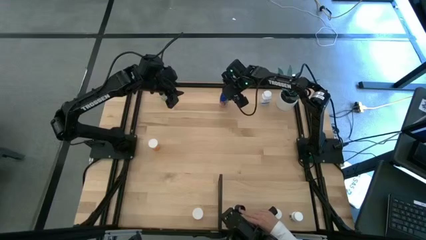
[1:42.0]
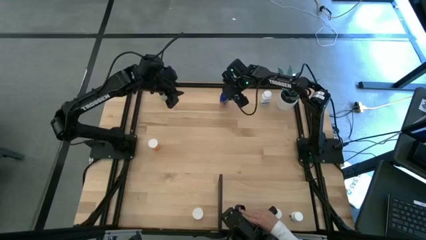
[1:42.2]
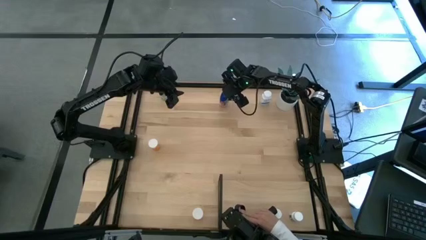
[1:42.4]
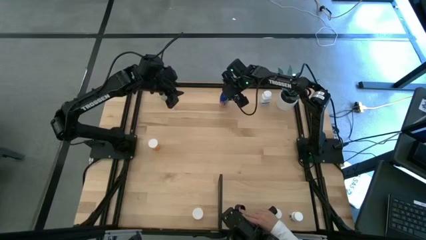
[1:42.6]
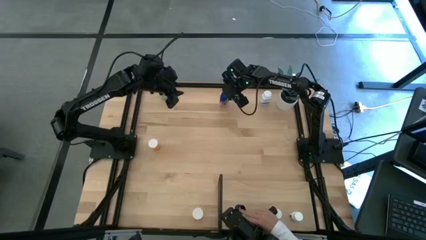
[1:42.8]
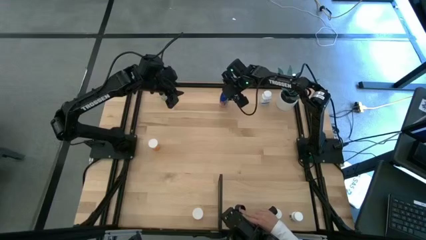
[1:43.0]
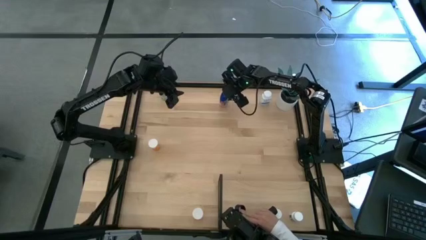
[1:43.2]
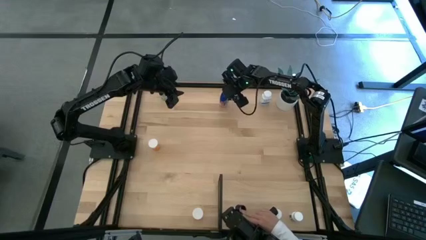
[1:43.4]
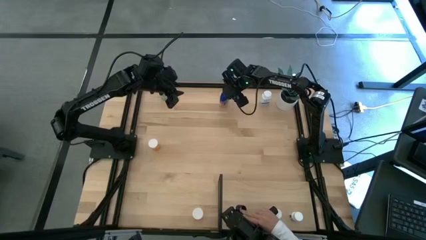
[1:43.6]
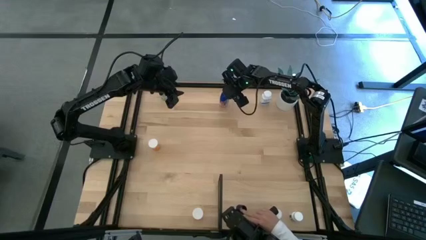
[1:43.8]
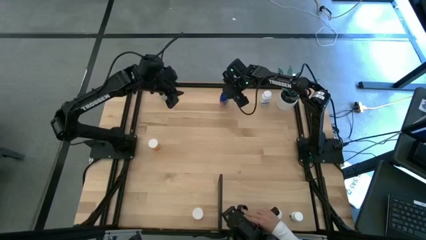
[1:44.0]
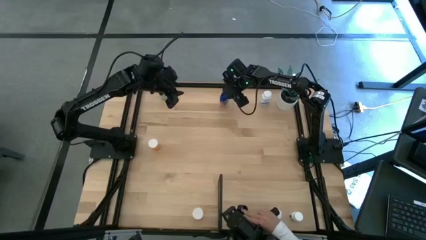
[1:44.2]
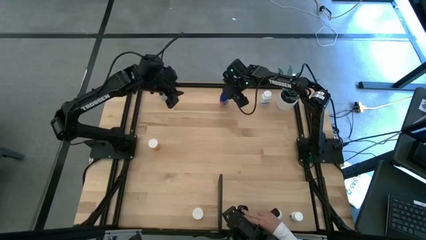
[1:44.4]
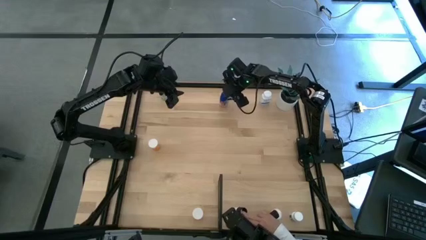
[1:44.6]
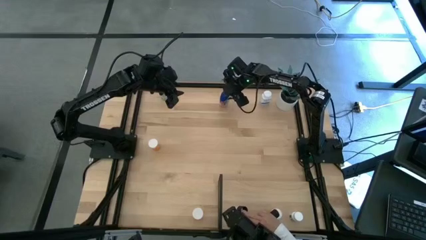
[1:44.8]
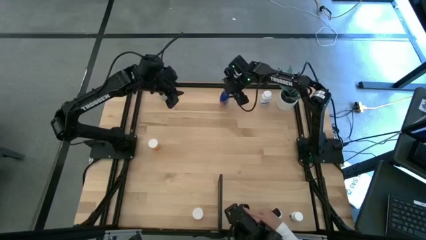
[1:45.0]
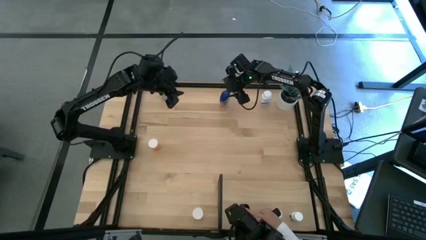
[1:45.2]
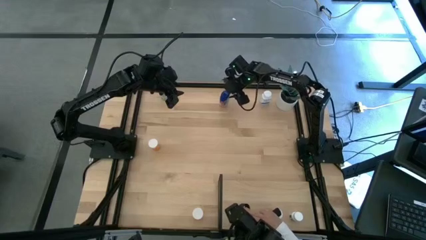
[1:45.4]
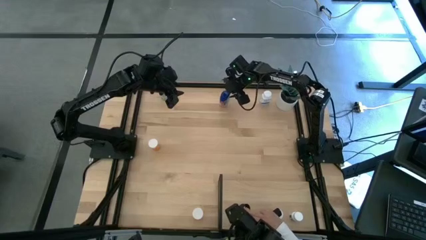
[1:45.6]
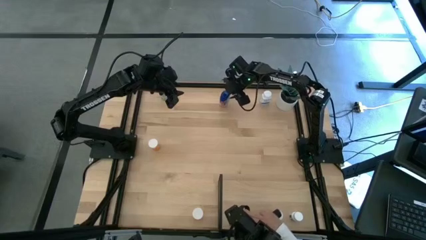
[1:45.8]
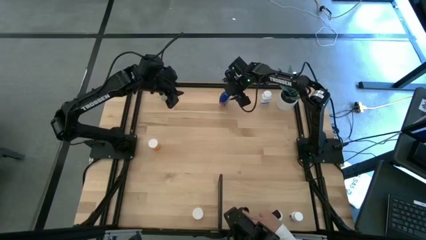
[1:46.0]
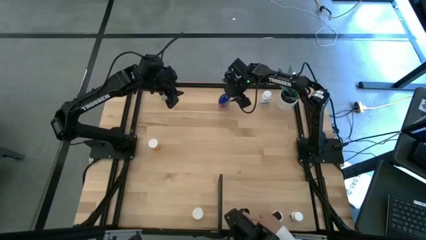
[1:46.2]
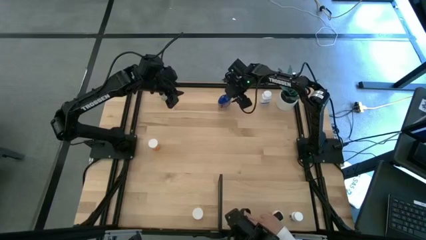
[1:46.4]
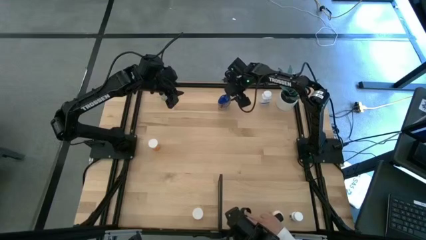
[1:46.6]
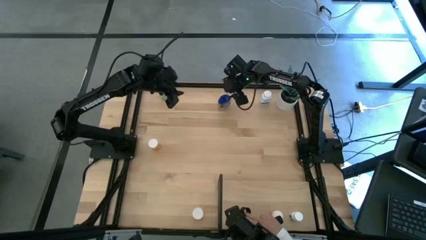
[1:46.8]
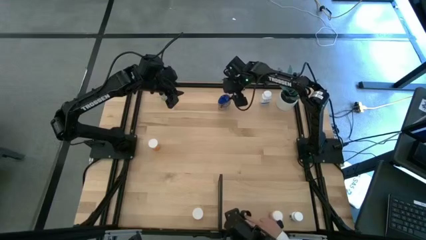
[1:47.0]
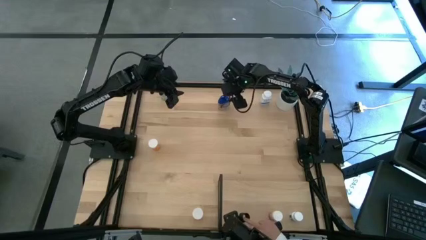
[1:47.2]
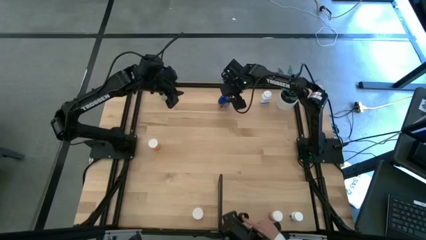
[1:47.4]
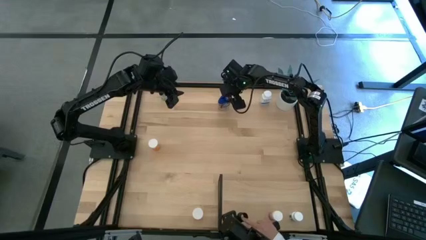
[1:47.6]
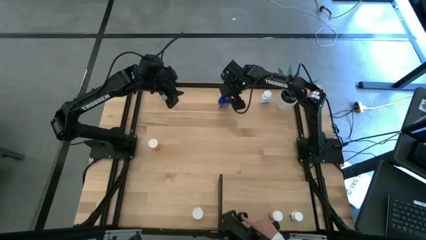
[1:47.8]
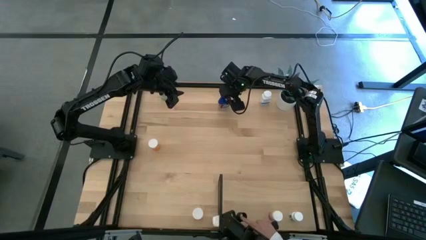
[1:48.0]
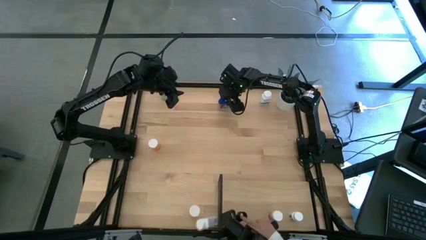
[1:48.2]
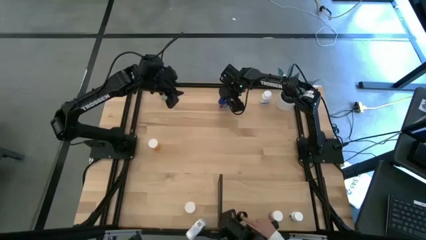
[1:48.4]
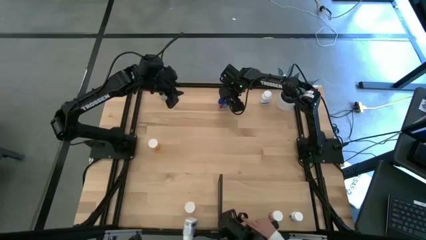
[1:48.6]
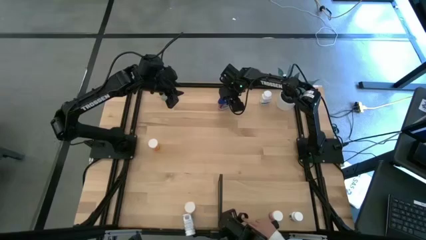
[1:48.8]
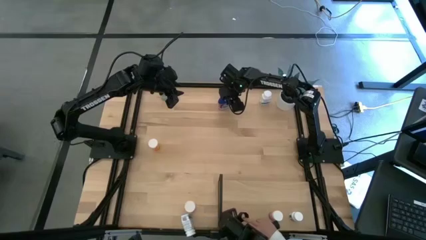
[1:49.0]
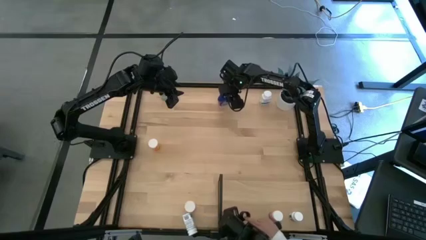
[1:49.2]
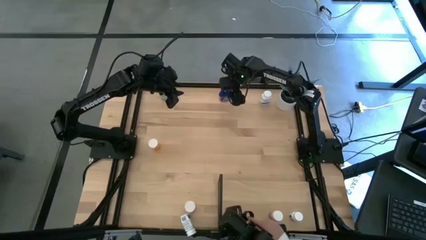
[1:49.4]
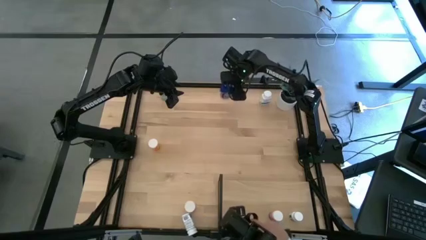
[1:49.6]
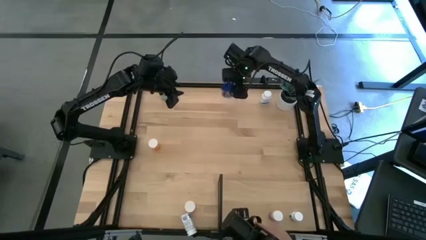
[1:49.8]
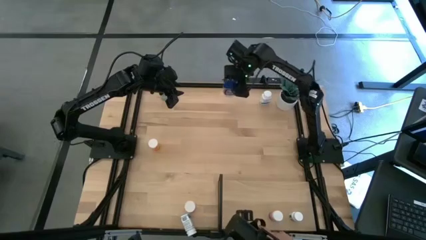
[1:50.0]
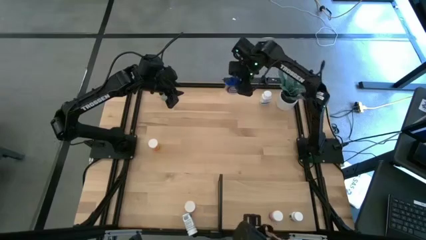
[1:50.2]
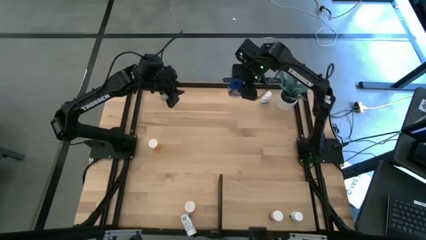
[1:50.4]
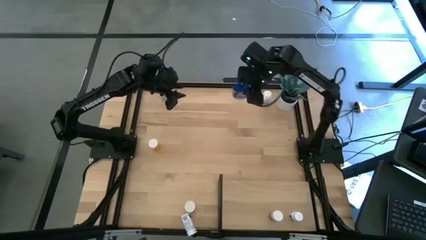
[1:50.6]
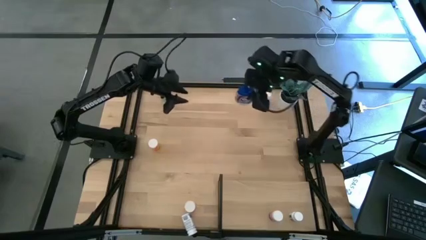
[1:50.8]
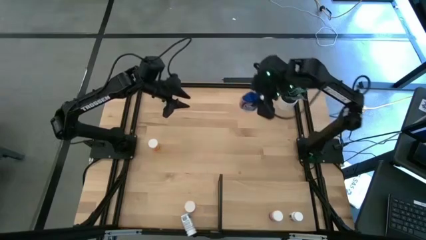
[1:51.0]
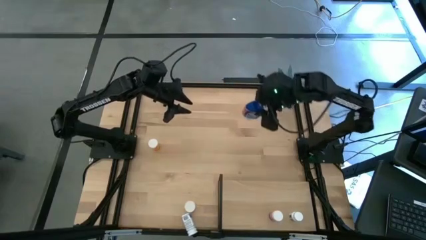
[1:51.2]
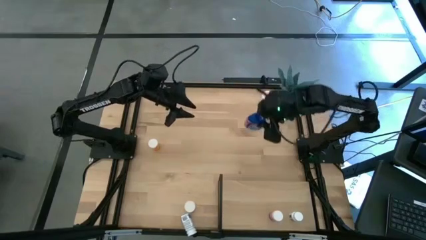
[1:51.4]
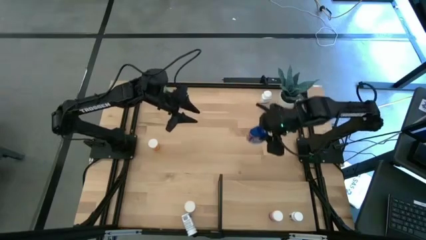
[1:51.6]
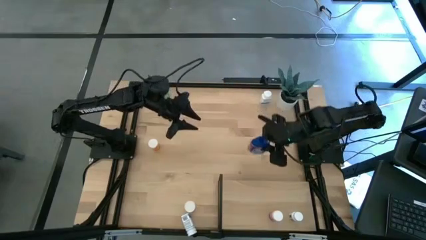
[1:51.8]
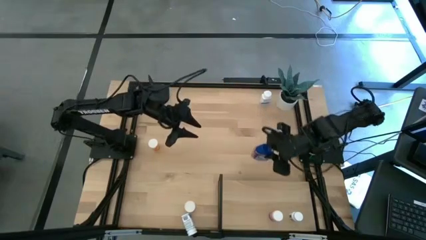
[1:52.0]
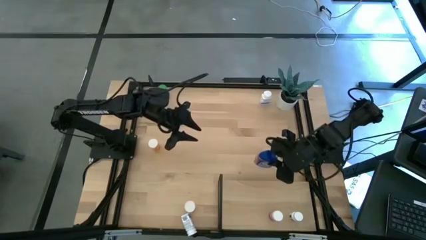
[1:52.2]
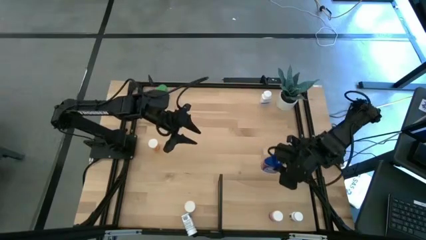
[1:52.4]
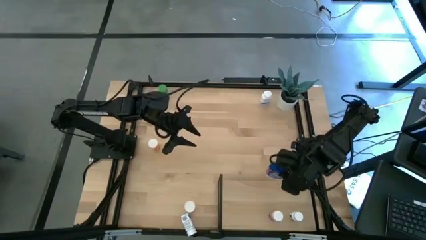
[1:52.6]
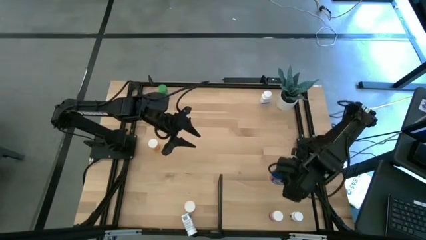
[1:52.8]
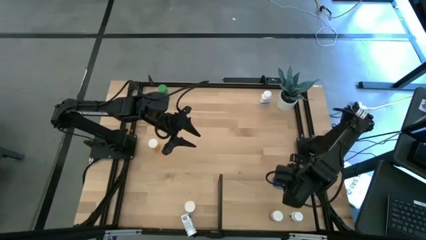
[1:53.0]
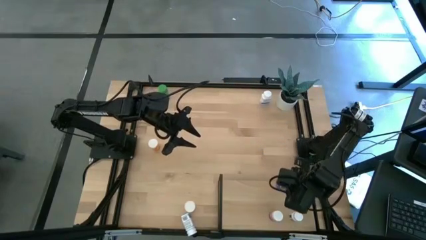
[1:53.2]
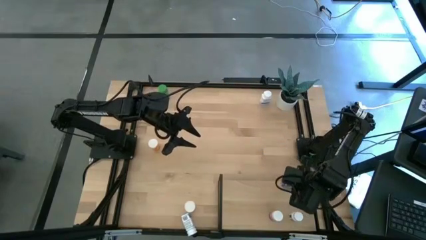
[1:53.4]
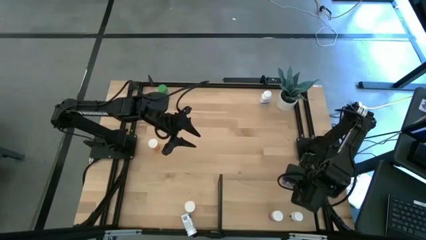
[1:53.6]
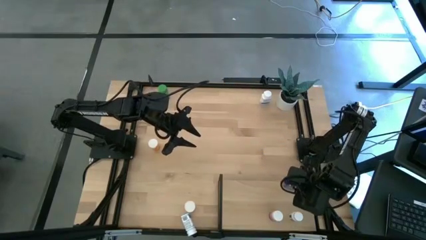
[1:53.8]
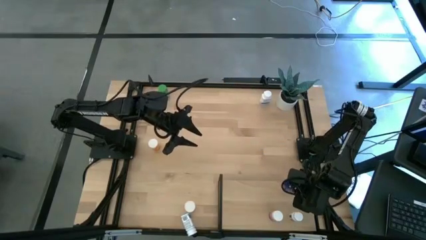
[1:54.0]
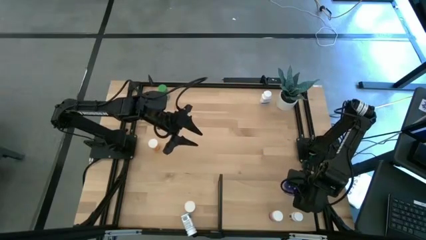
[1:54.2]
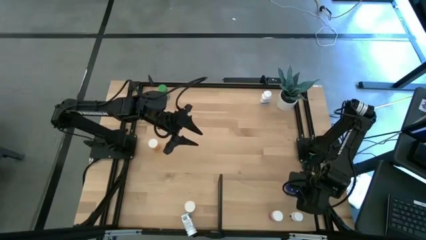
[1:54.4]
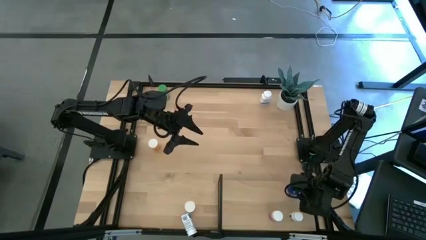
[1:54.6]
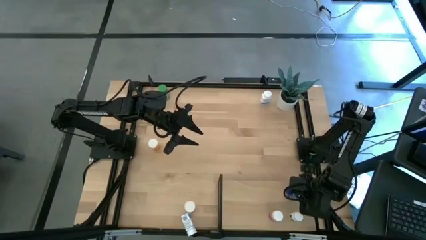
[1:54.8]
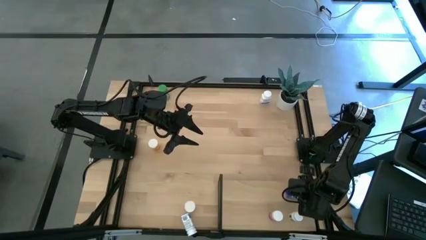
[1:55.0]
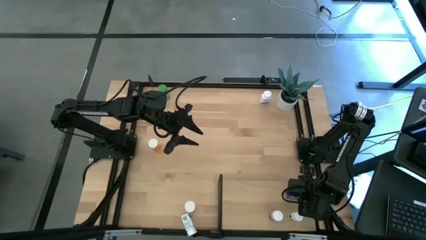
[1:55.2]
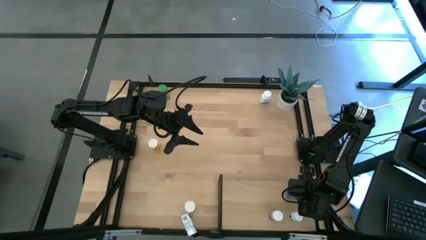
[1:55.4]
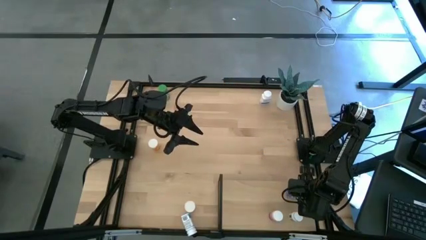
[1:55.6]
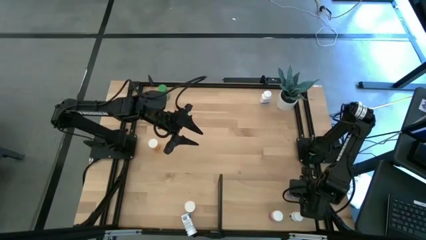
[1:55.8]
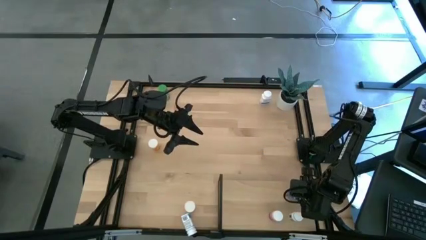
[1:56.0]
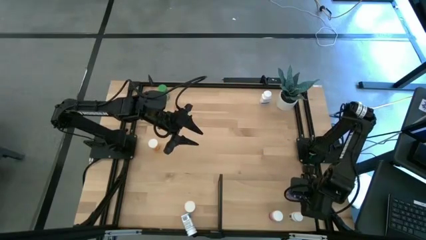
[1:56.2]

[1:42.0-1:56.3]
Task: Pick and place medicine bottles onto shelf by color
Put the blue pill bottle onto the shelf
